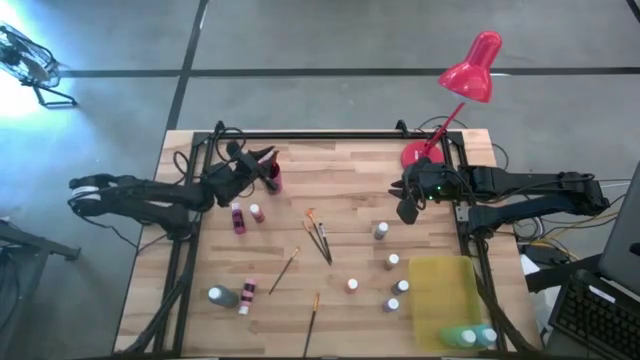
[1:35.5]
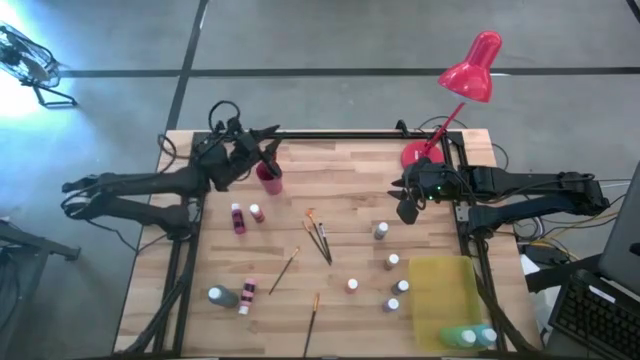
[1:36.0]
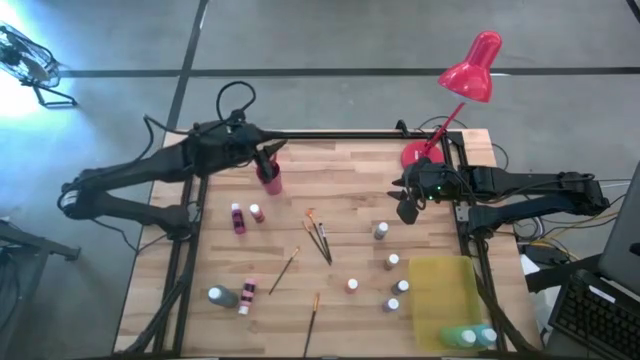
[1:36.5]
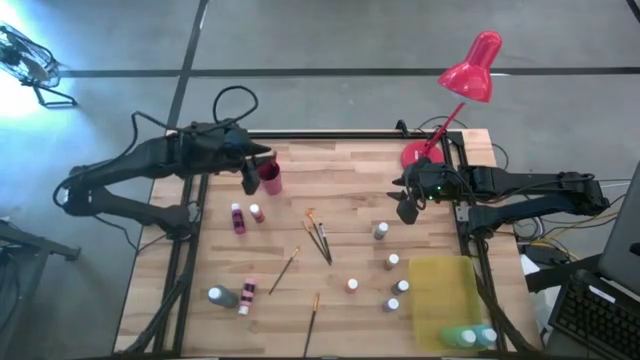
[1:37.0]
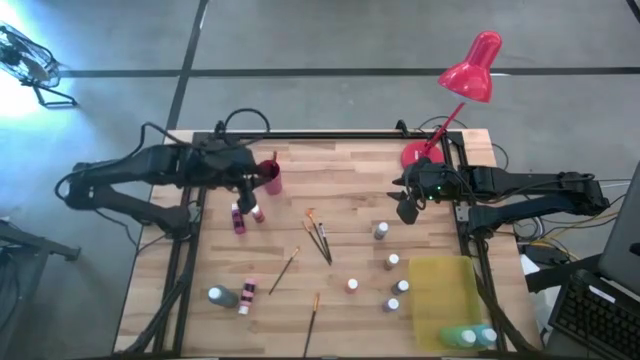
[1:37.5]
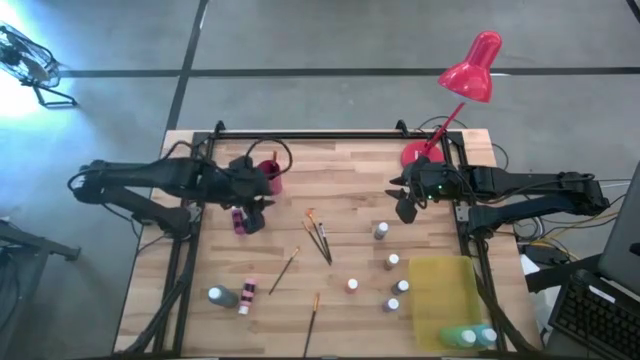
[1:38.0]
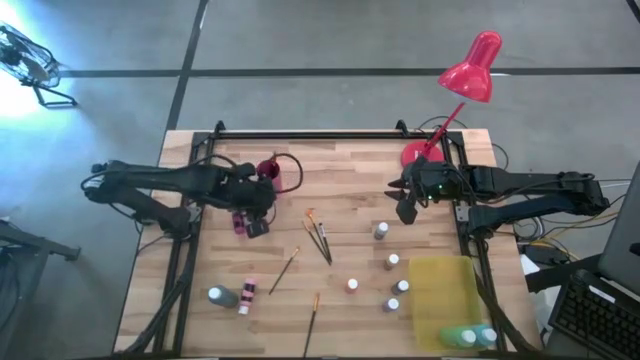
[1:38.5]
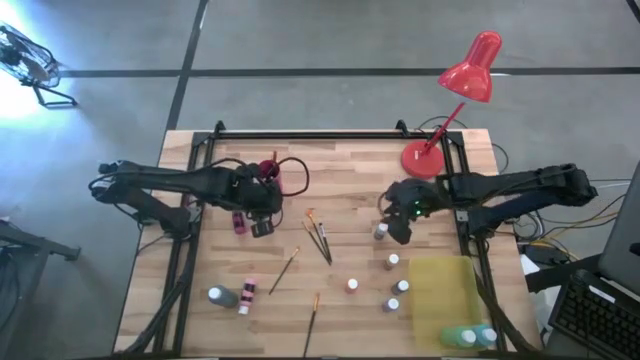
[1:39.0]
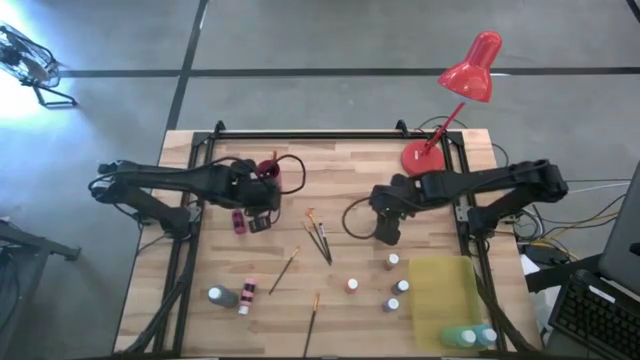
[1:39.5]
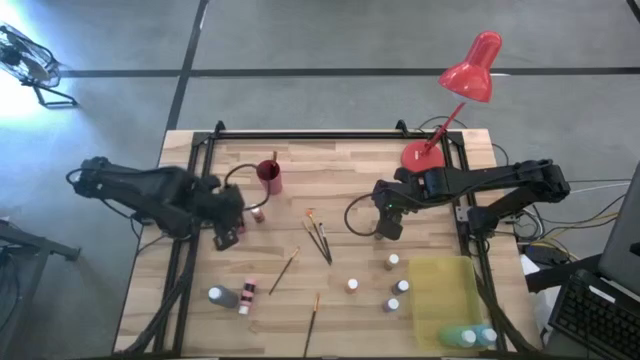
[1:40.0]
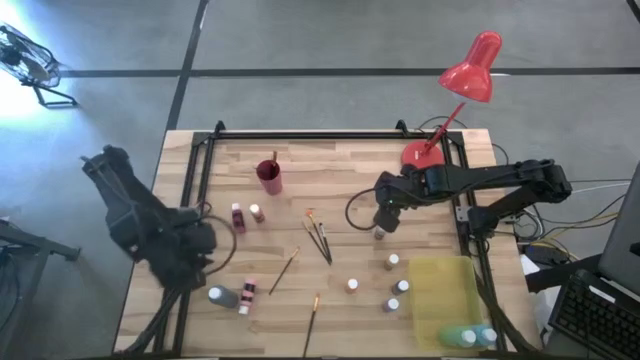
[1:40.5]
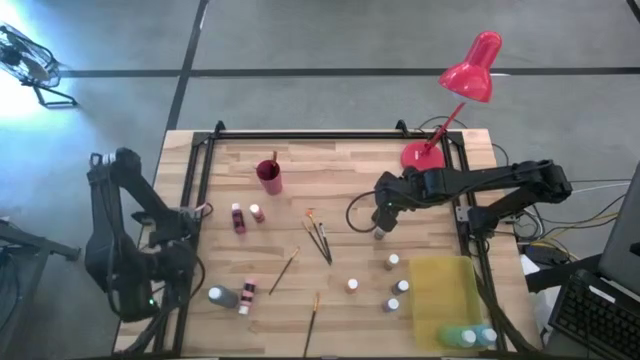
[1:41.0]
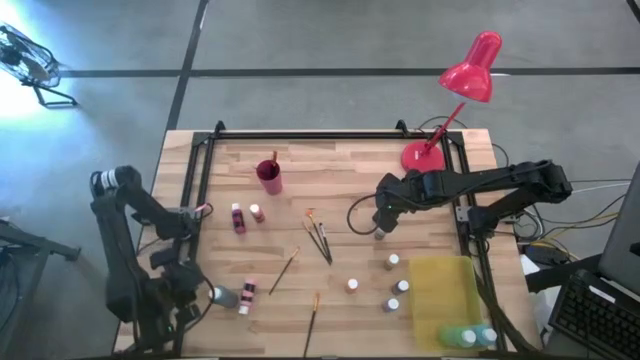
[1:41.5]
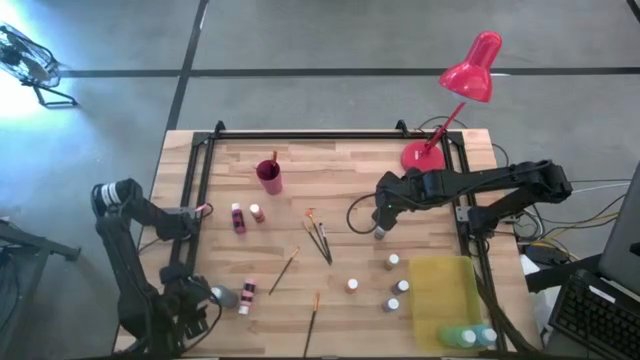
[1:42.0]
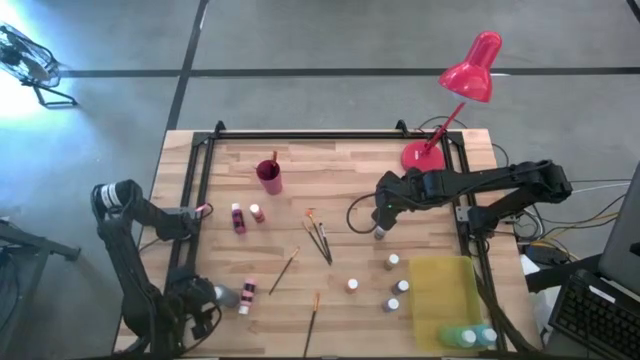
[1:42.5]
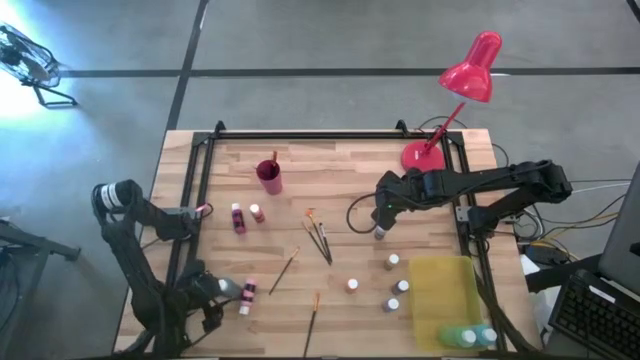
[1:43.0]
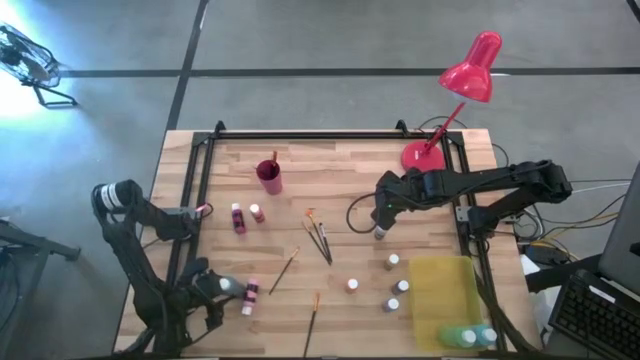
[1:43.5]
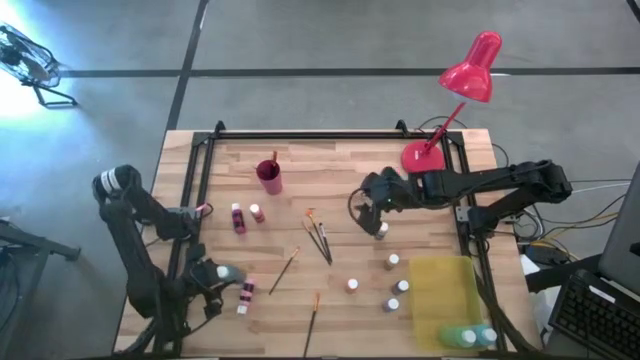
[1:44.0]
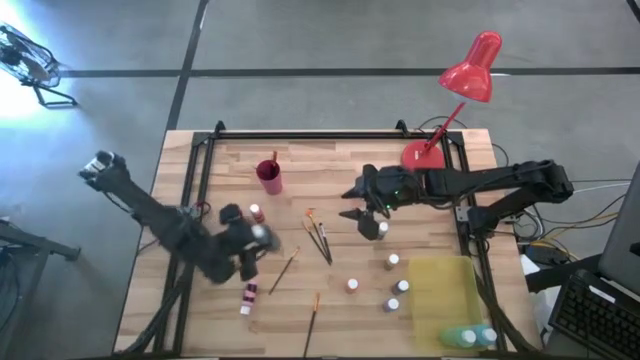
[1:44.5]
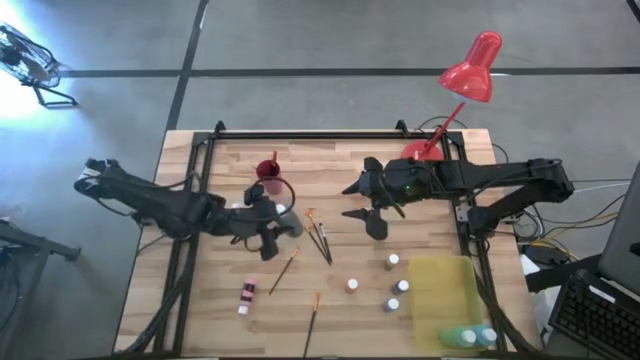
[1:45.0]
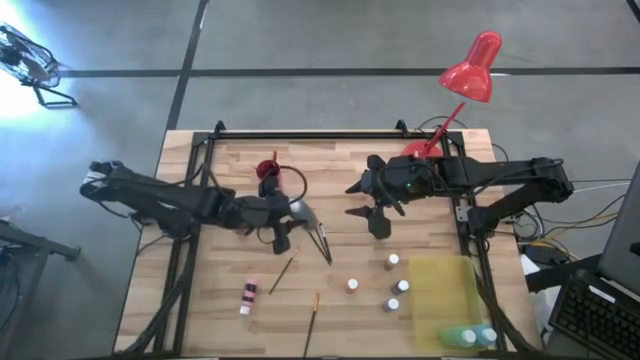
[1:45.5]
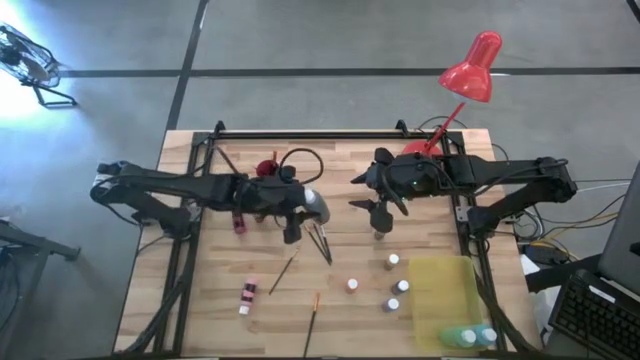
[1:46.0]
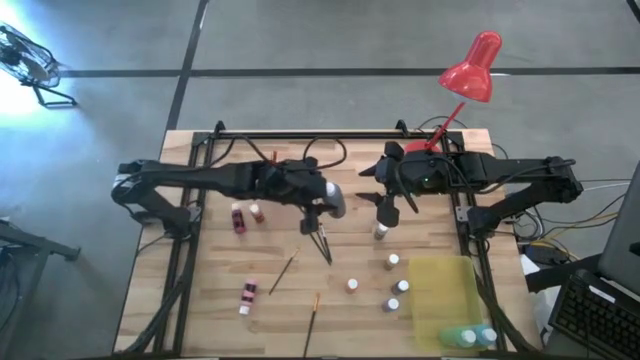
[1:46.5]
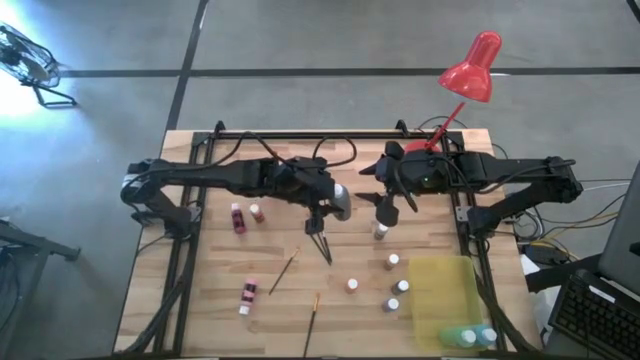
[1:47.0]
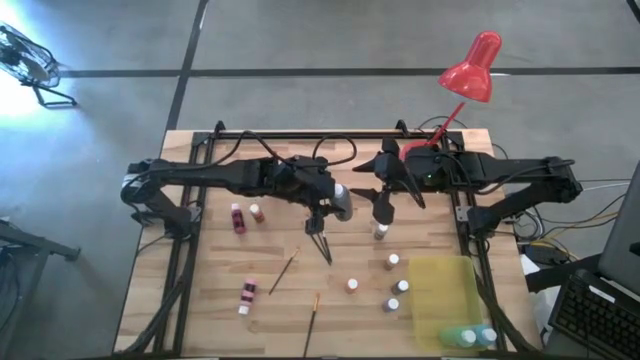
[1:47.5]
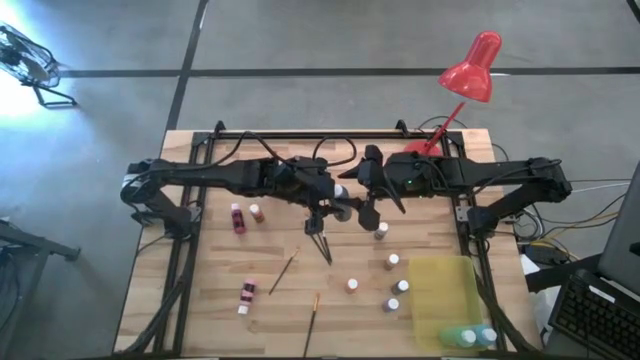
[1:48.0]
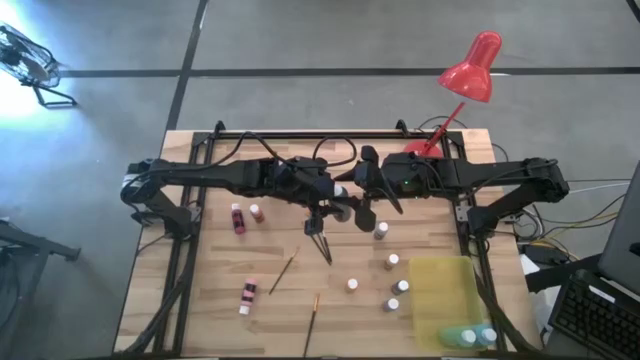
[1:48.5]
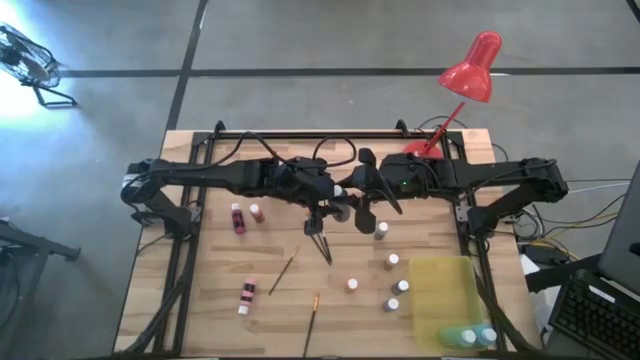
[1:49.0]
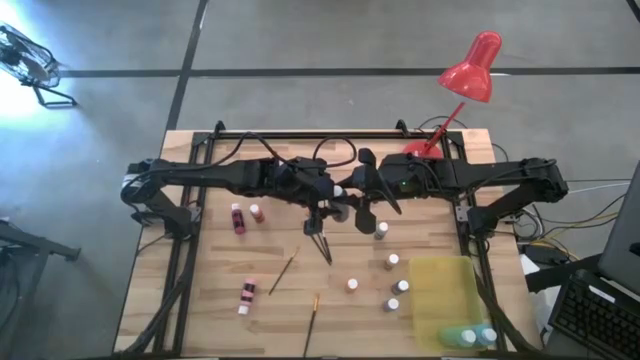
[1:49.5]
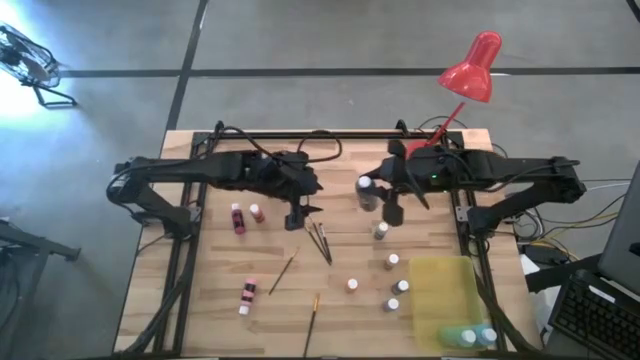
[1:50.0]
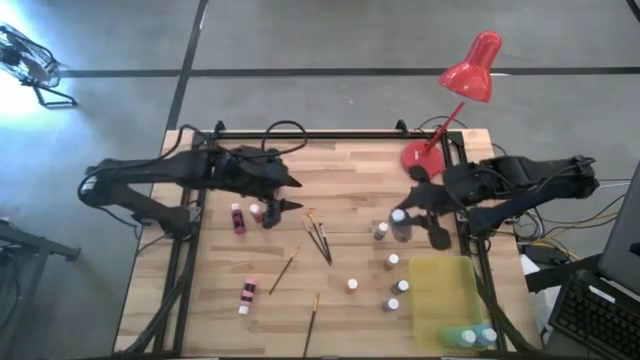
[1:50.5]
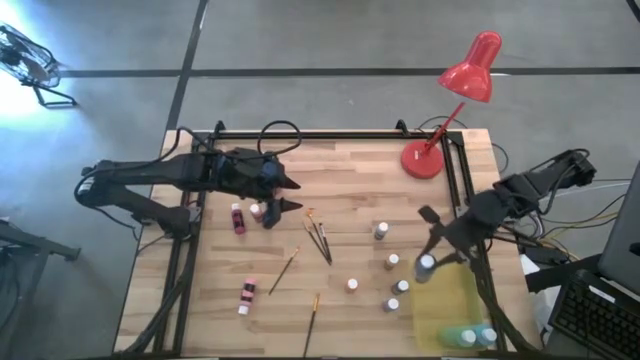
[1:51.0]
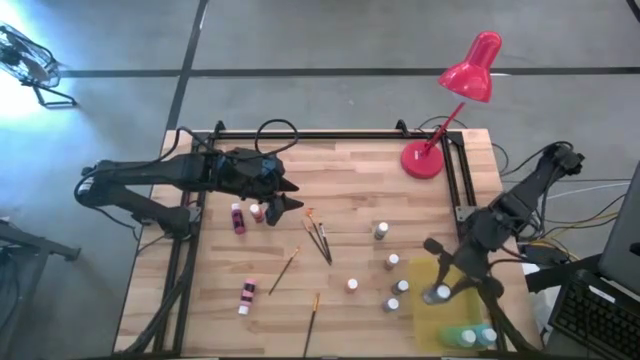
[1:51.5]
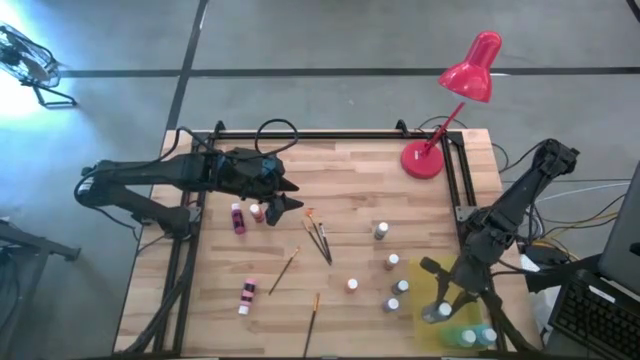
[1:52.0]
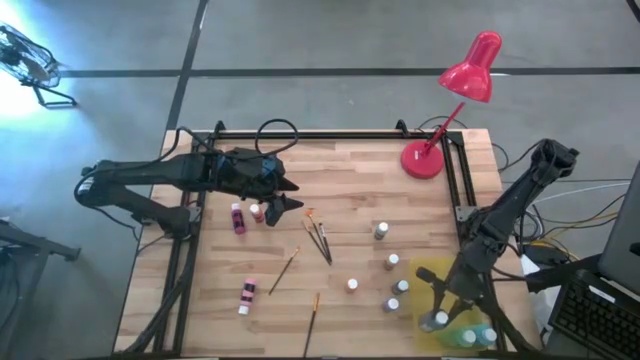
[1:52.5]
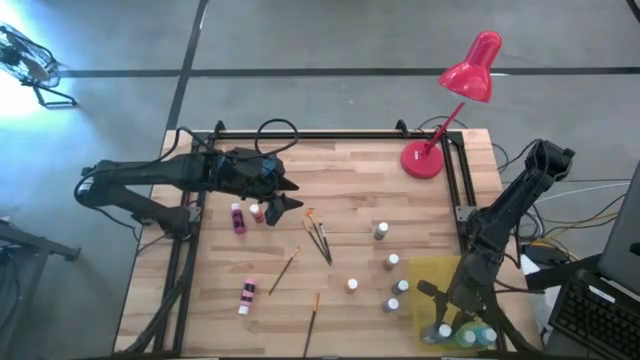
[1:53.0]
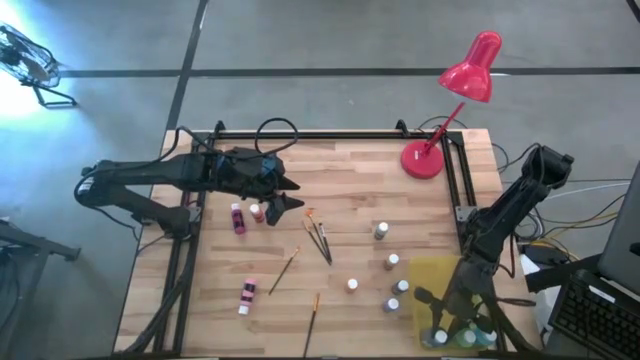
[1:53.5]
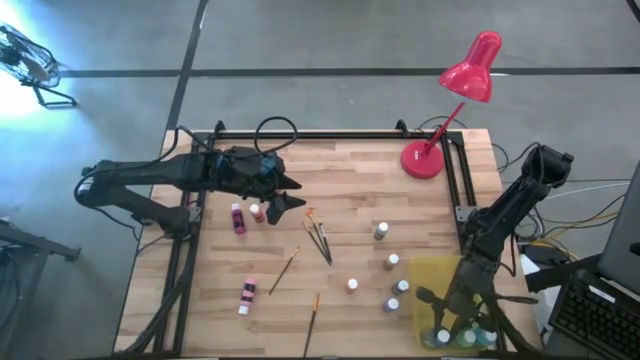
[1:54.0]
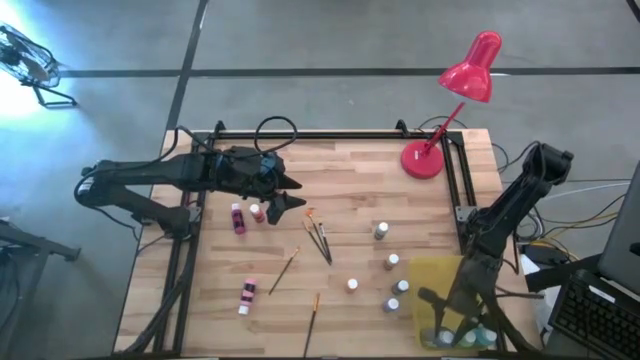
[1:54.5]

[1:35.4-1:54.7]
Task: Pick & Place Paint Supplies
Put the black paint bottle into the bin
